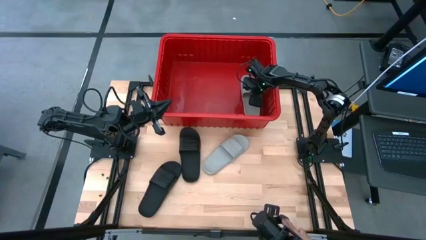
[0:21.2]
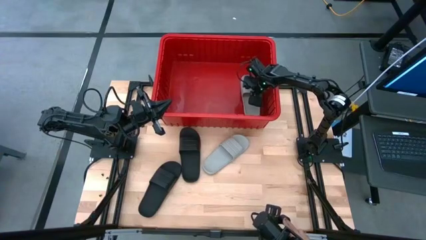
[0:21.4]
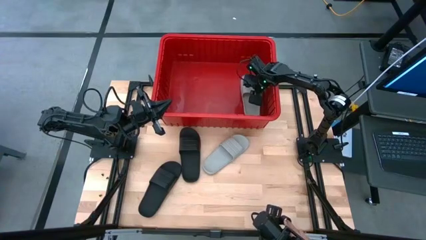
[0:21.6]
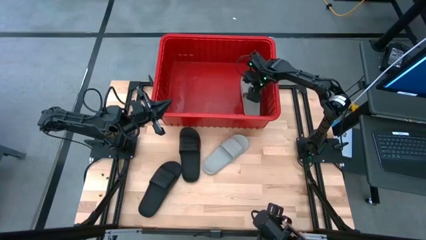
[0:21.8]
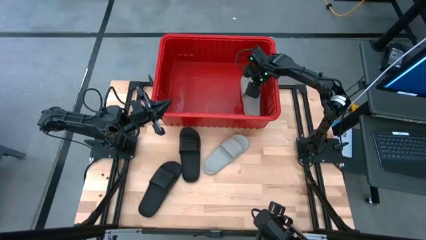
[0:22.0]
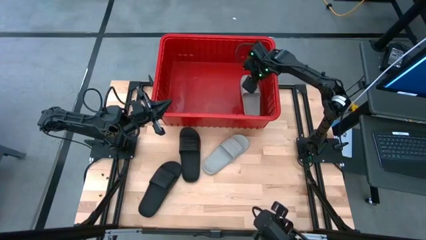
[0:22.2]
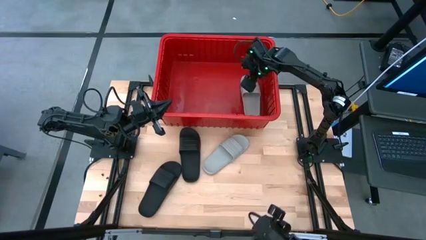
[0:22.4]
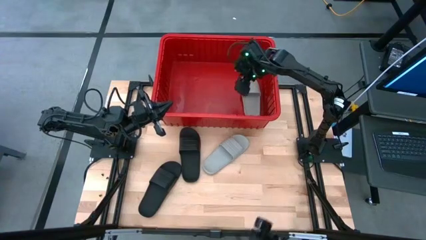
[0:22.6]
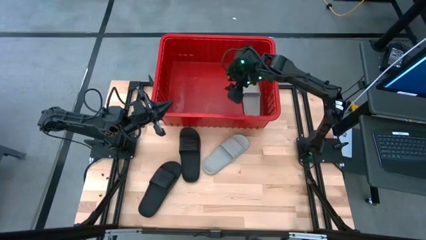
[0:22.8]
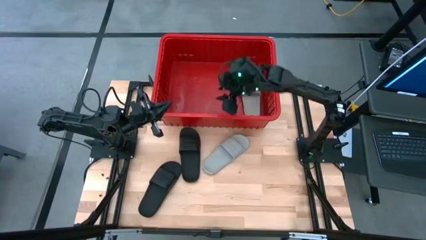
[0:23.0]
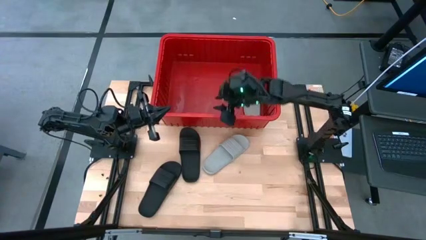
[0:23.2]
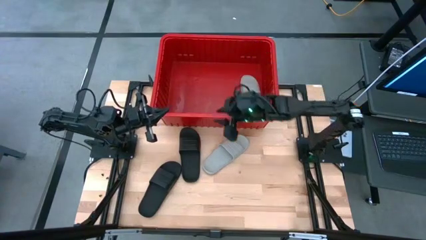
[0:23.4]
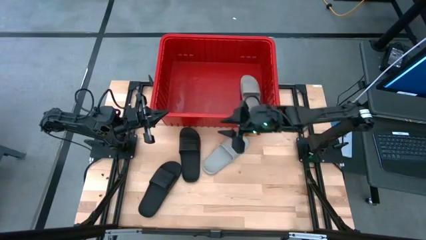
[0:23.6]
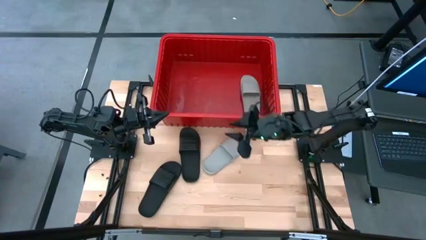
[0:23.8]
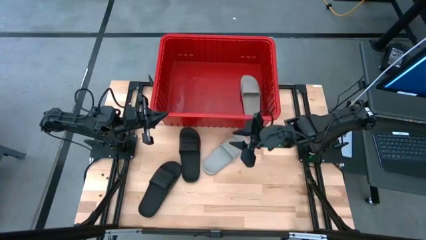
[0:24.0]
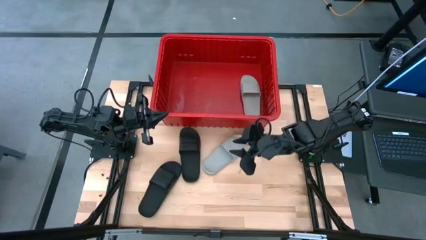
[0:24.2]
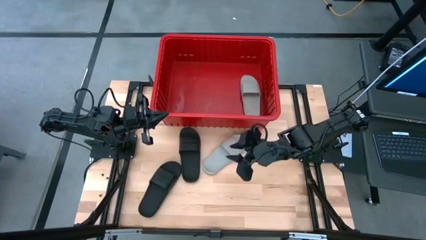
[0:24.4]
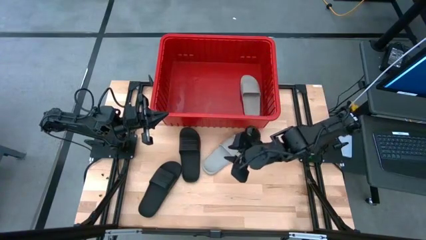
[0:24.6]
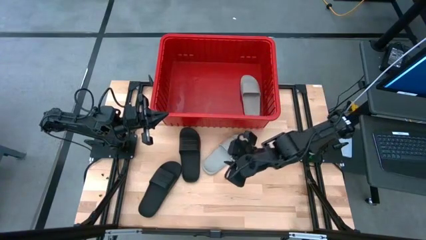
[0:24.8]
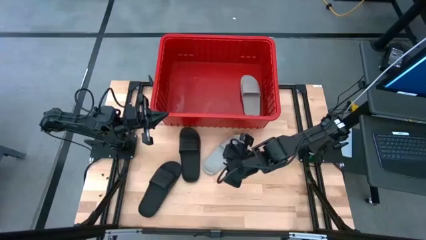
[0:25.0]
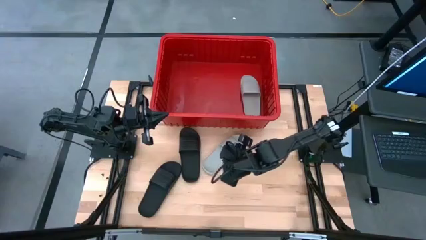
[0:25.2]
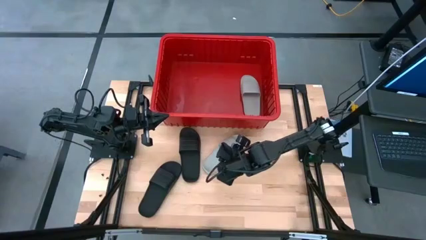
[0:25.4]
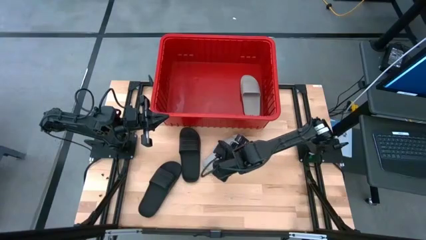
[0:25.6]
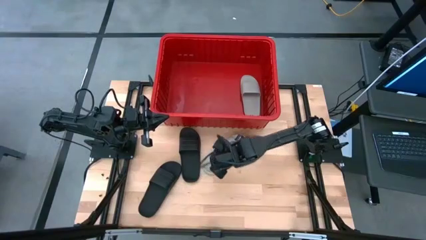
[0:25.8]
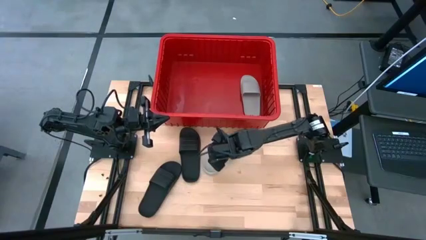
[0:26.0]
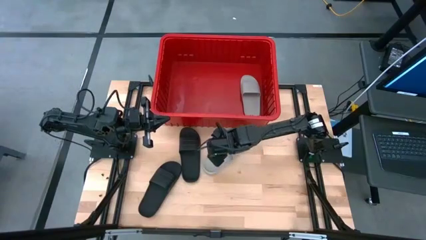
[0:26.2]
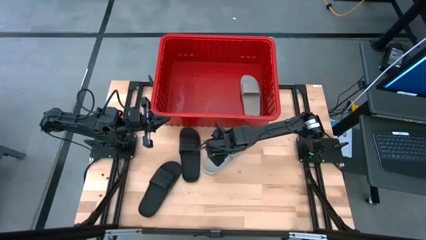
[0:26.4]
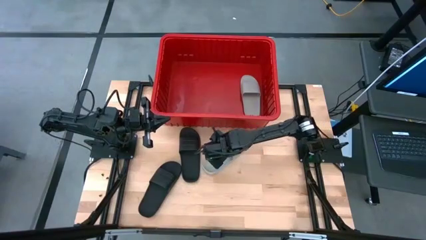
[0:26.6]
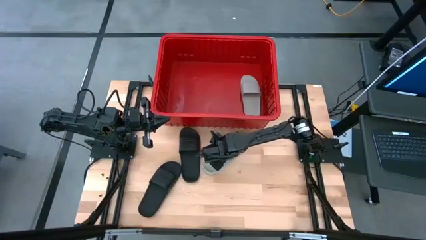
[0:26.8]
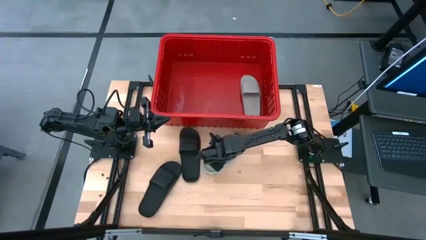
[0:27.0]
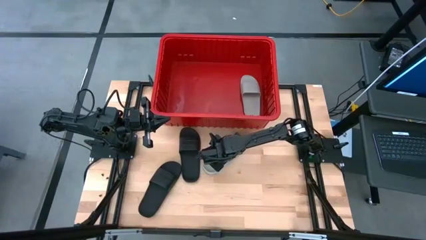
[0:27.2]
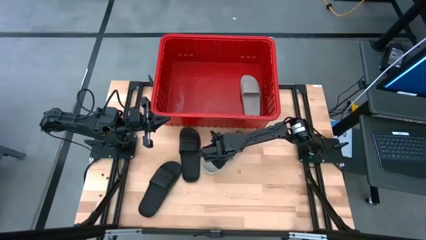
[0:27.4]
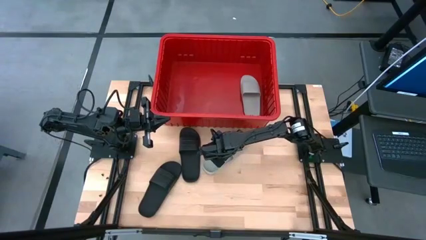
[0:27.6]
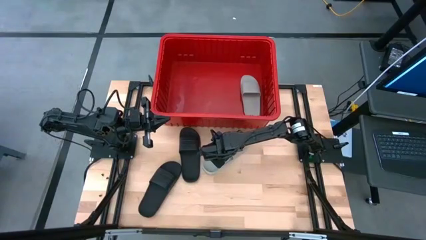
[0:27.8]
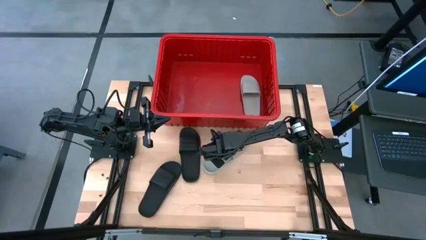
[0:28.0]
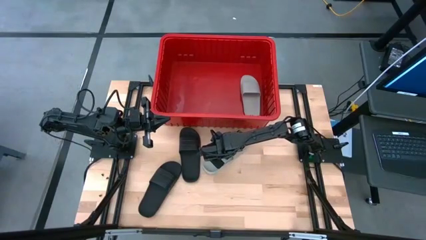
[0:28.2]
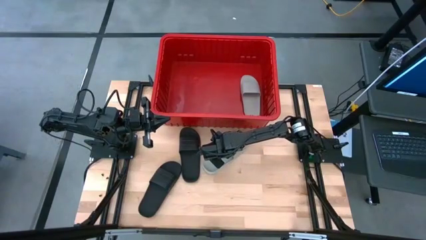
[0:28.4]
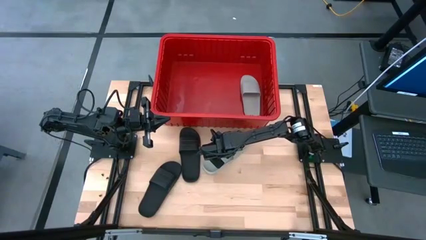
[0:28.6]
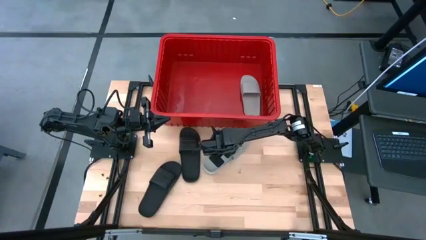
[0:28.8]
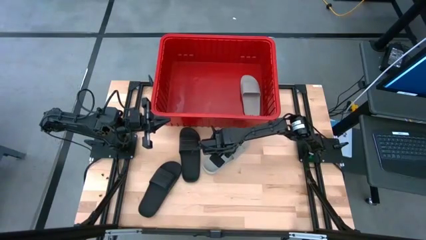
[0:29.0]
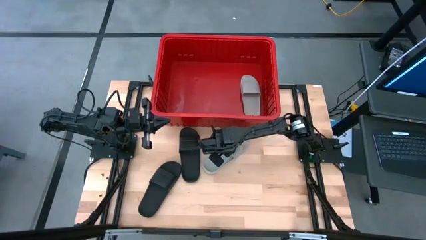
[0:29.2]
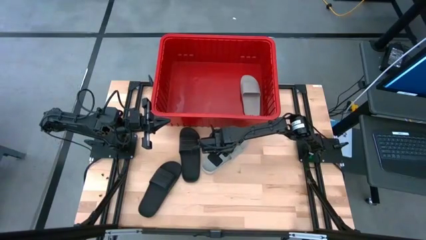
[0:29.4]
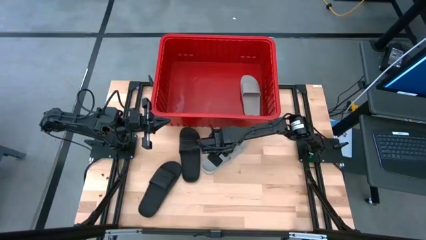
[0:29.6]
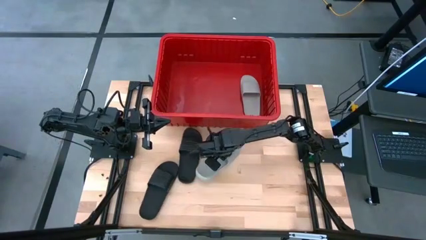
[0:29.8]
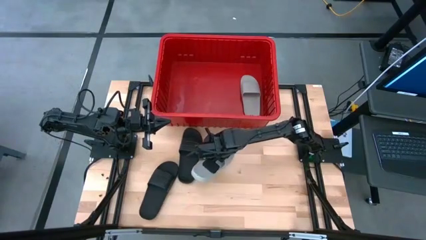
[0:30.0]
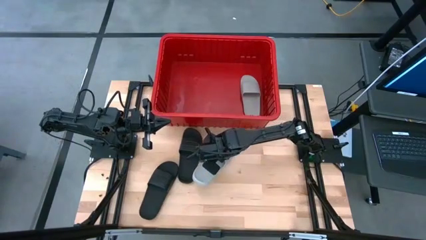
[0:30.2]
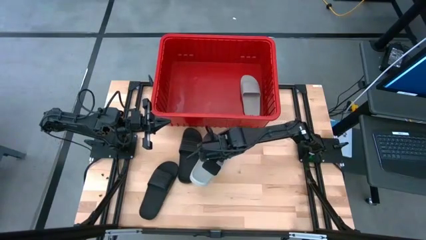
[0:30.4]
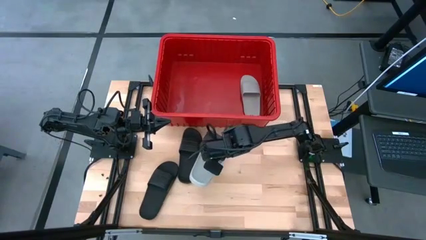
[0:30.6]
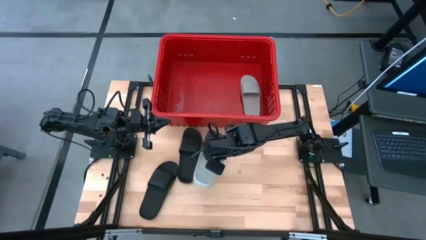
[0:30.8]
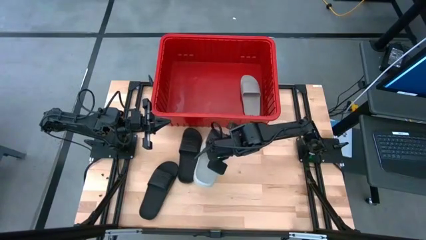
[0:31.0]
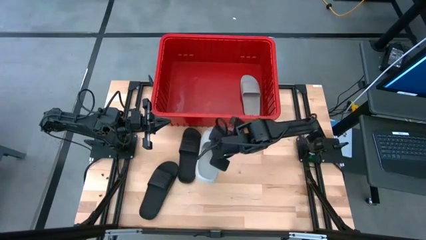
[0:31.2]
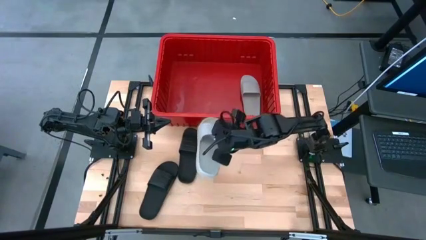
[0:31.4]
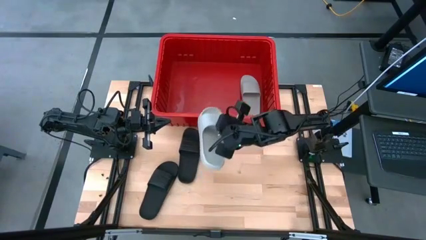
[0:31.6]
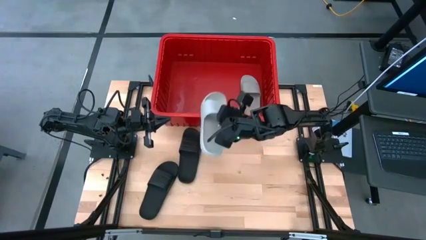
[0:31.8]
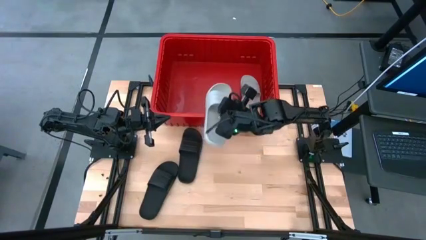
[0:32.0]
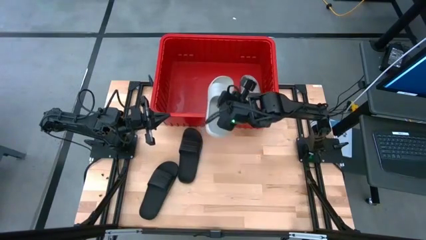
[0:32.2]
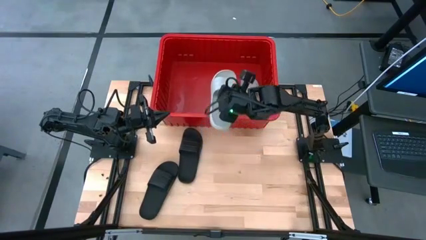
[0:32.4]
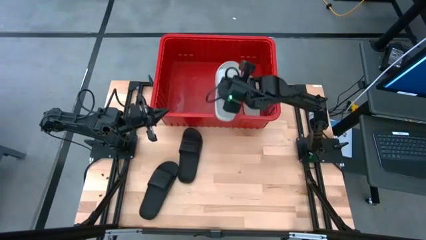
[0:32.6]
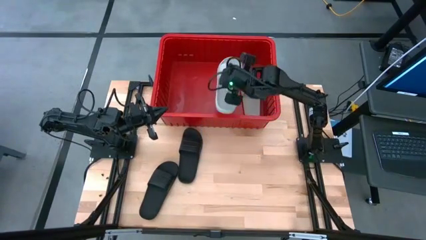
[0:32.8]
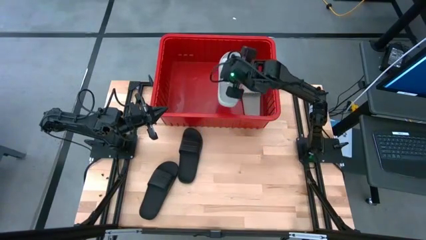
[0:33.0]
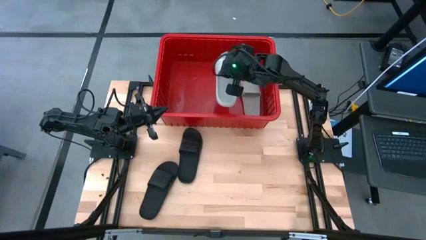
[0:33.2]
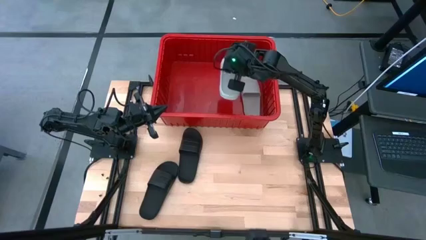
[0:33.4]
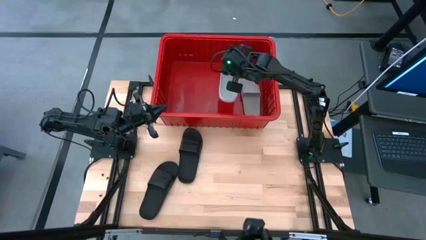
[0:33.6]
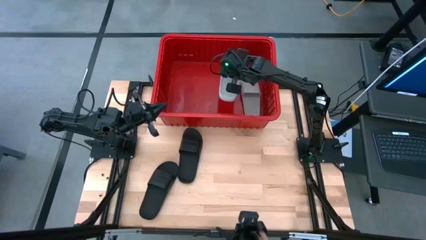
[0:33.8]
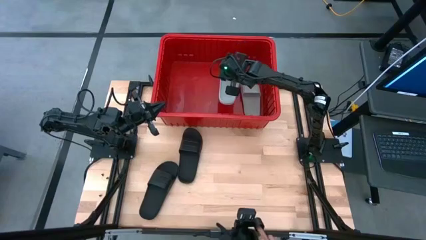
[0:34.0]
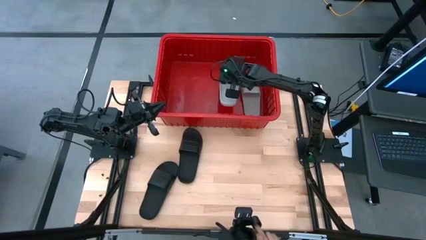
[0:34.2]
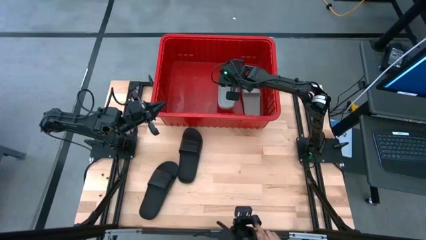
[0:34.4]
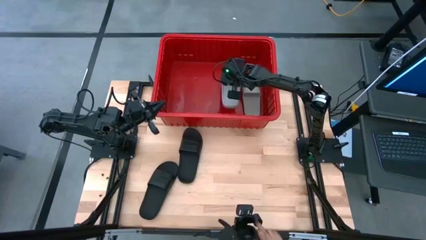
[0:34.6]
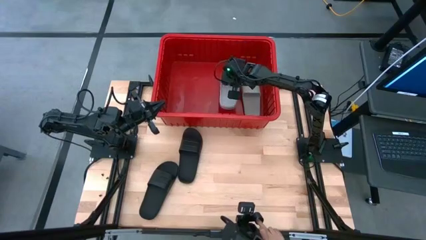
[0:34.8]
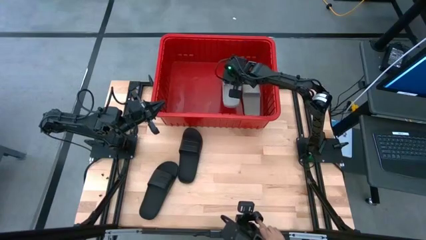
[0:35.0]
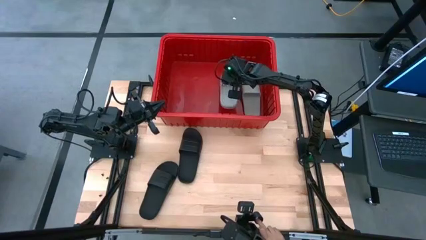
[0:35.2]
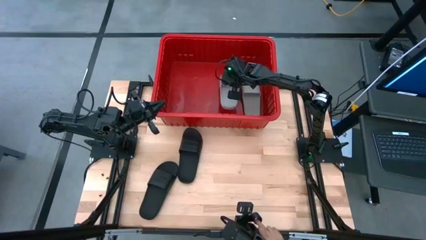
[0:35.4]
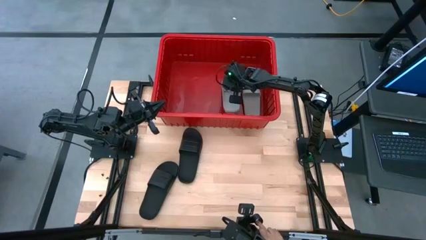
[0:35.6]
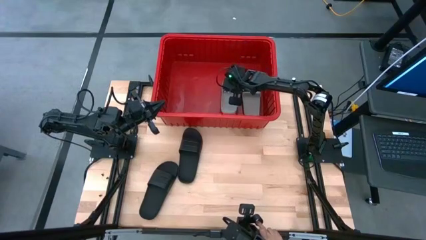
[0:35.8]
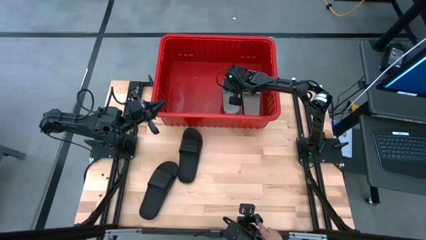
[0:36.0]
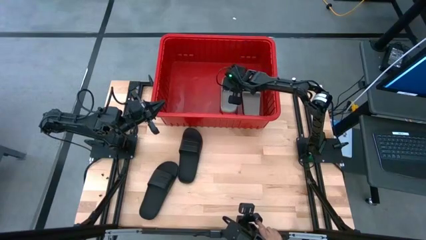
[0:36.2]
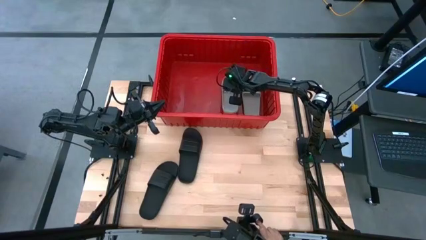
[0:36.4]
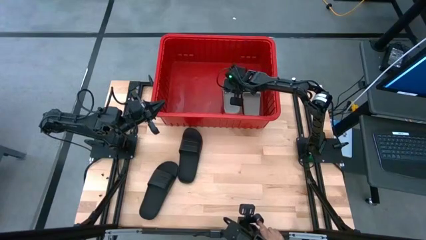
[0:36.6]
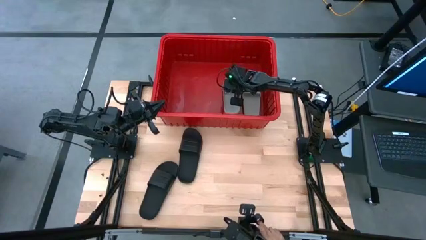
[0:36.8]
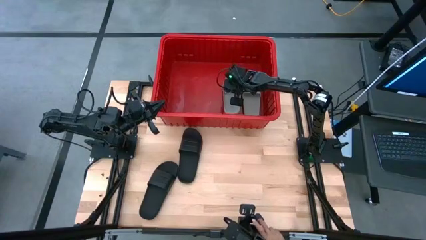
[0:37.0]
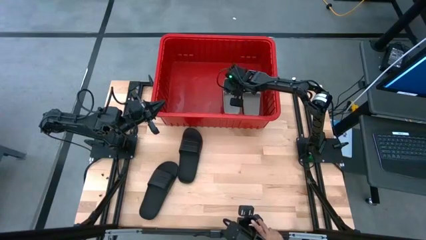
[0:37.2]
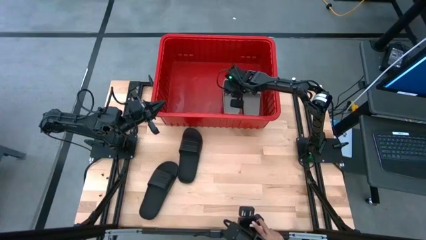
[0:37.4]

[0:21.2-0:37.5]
Task: Pick and place slides into bin
Put the gray slide into the red bin
